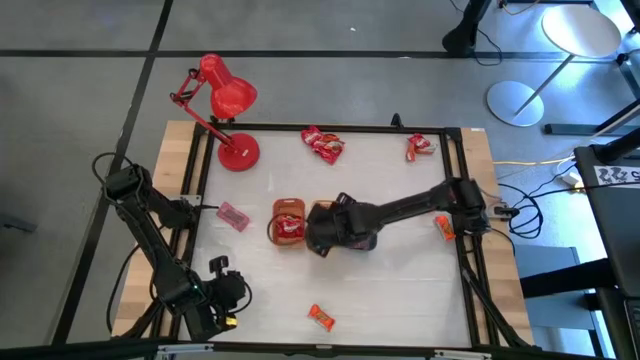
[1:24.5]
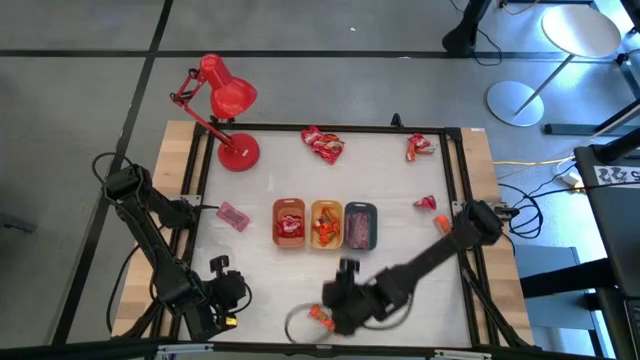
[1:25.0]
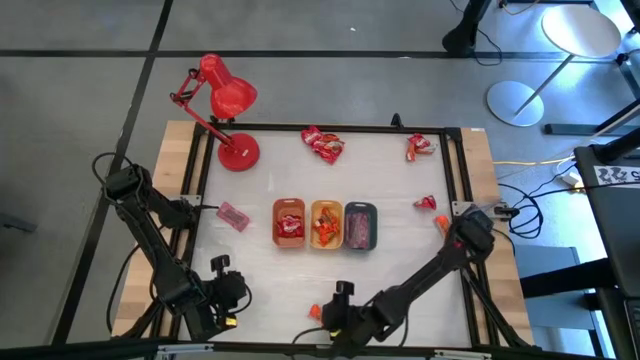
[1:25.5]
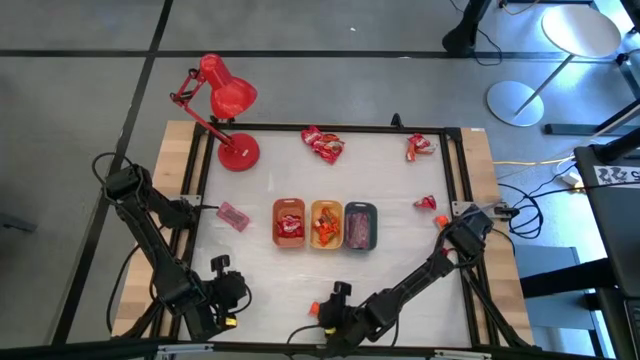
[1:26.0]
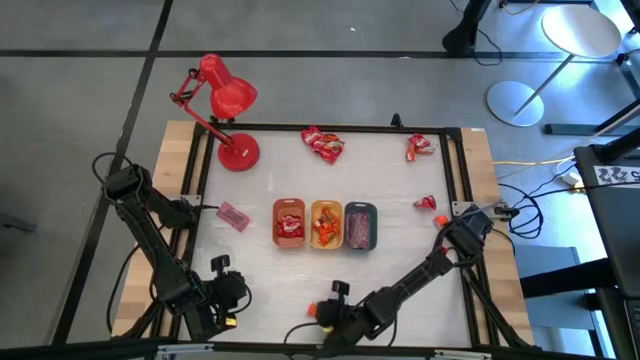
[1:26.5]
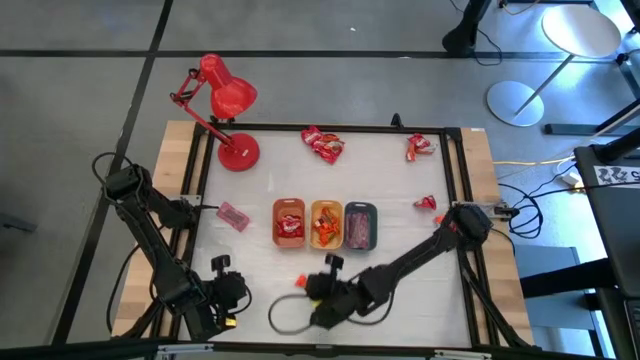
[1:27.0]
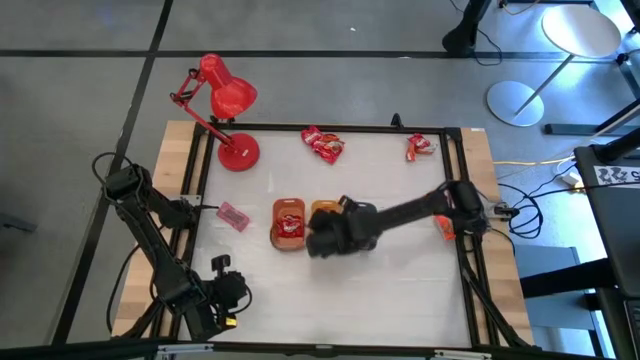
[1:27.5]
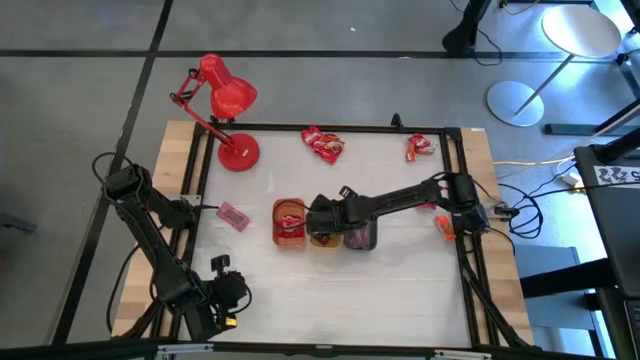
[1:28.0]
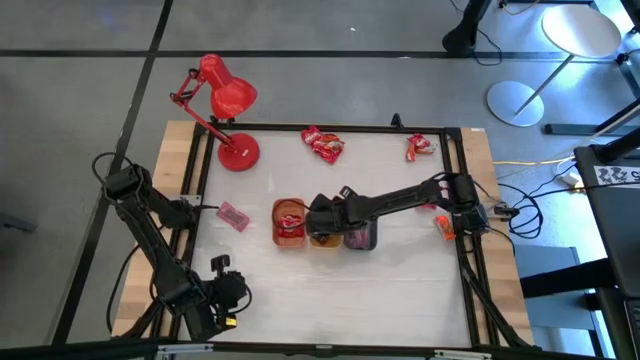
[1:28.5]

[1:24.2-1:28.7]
Task: Sort candy
Put the orange candy into the yellow bin

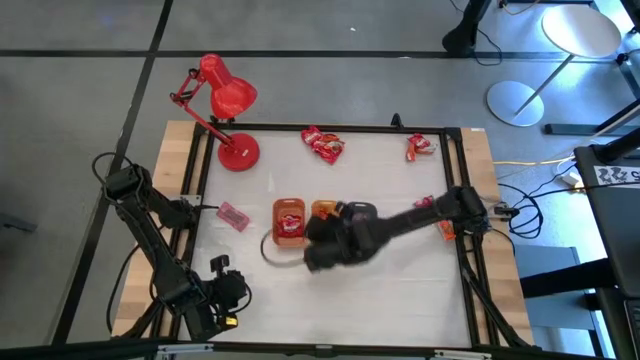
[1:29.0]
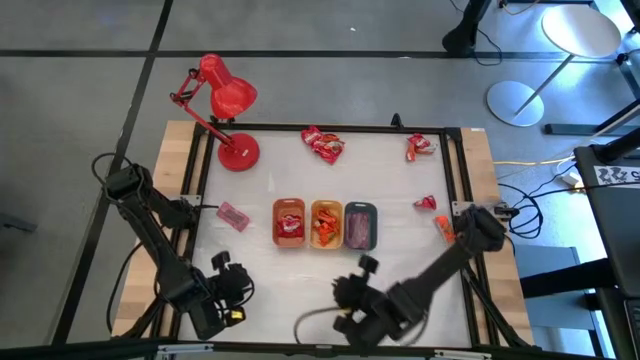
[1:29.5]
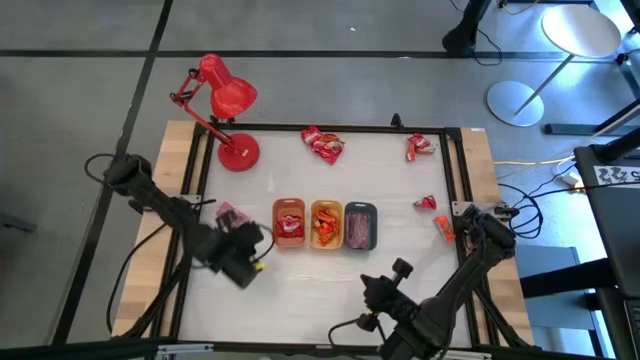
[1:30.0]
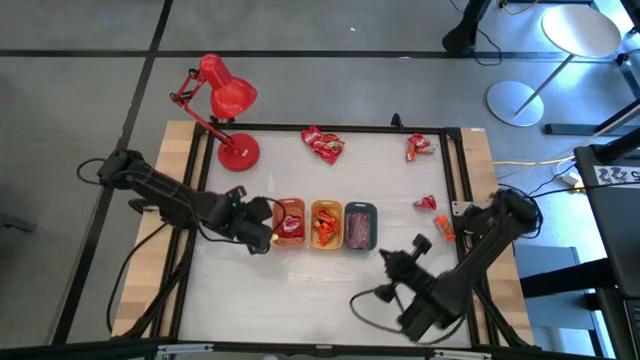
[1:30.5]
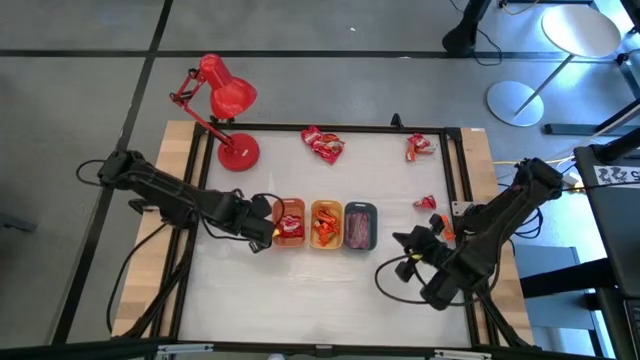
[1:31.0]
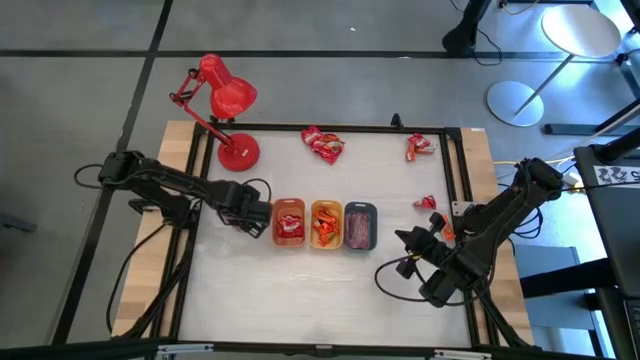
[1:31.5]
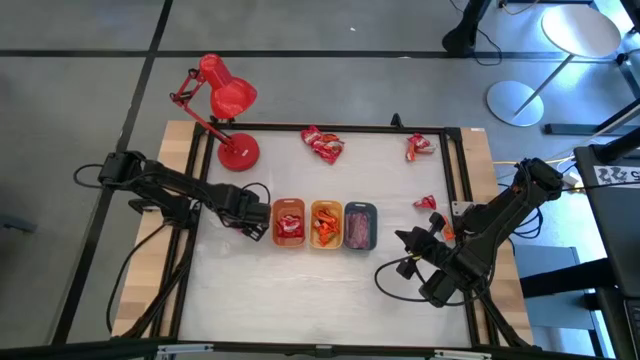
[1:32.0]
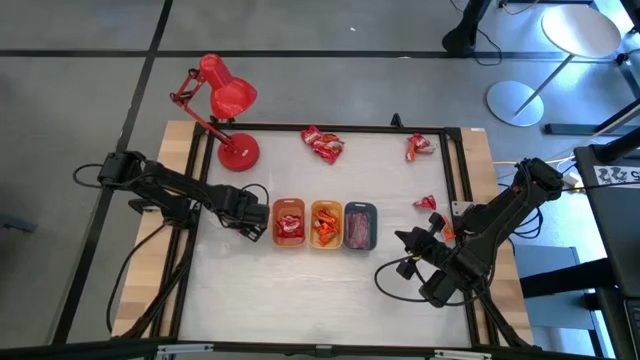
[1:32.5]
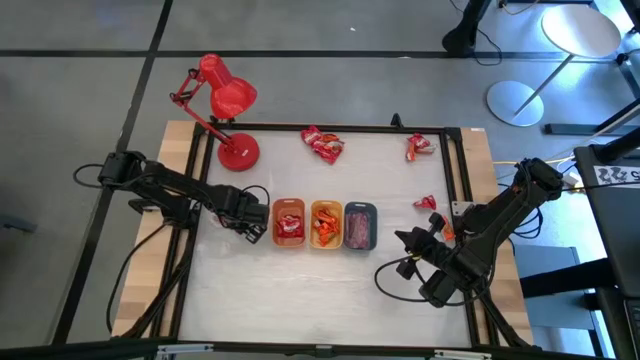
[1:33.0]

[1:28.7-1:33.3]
Put the pink candy into the blue bin

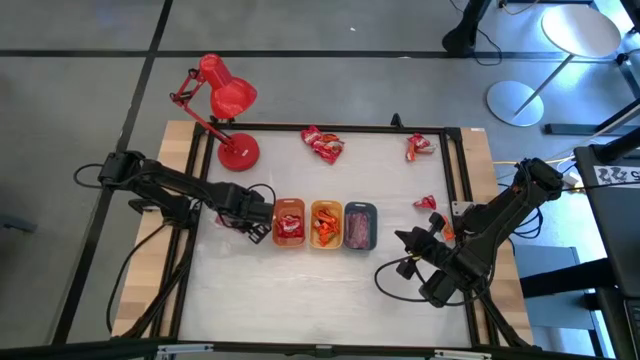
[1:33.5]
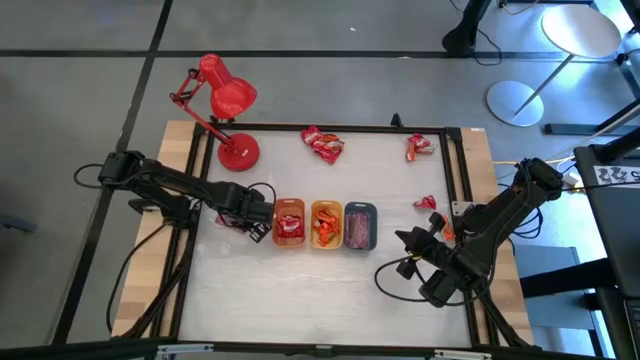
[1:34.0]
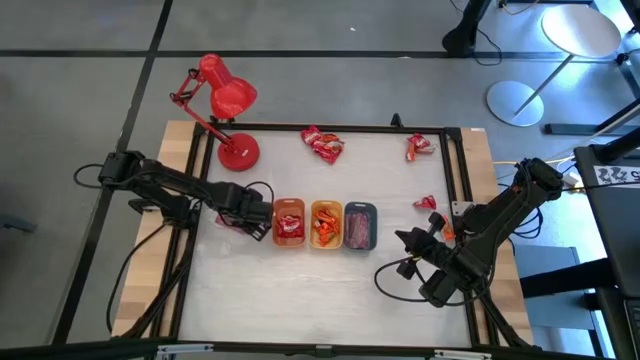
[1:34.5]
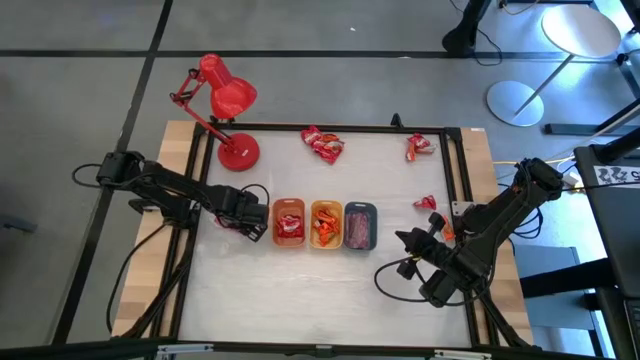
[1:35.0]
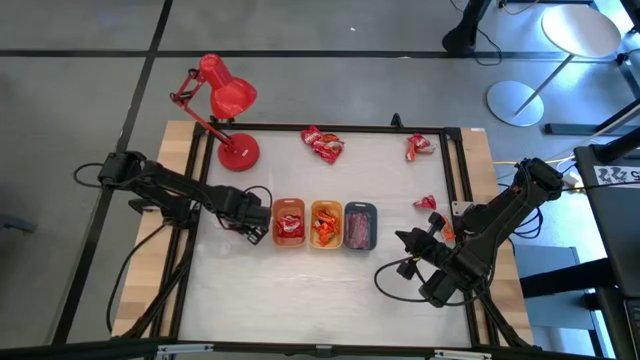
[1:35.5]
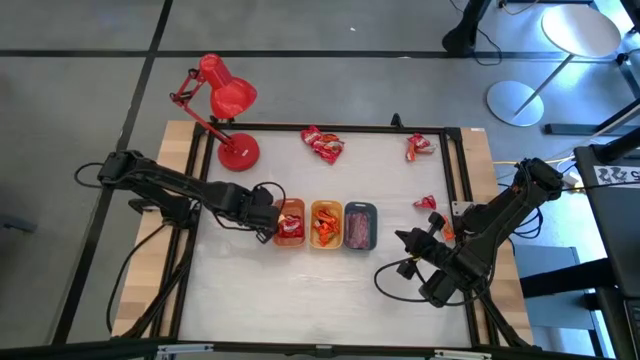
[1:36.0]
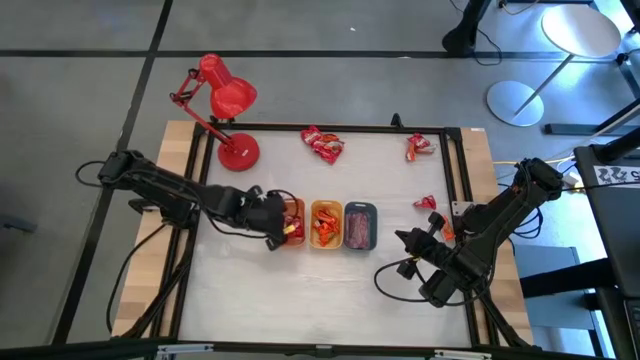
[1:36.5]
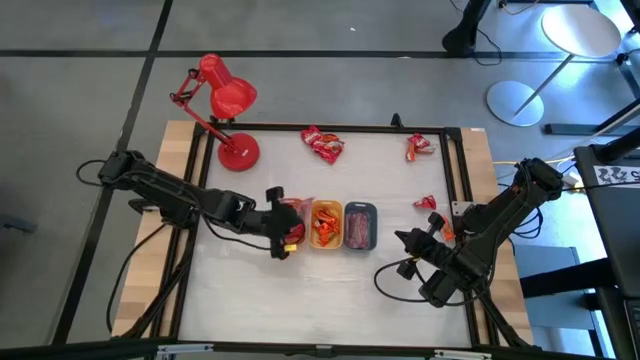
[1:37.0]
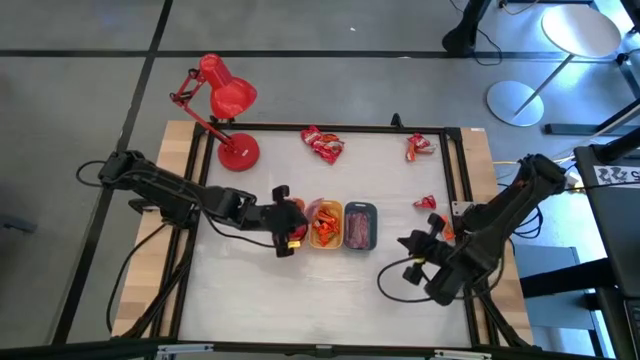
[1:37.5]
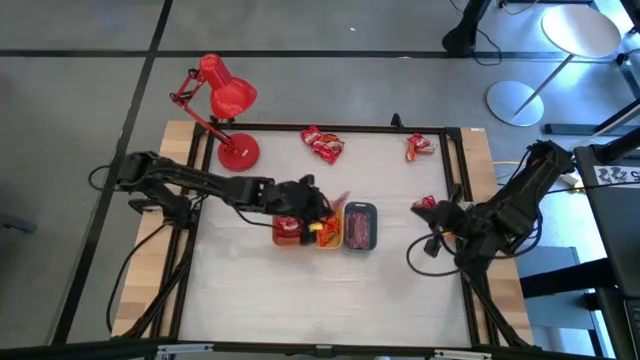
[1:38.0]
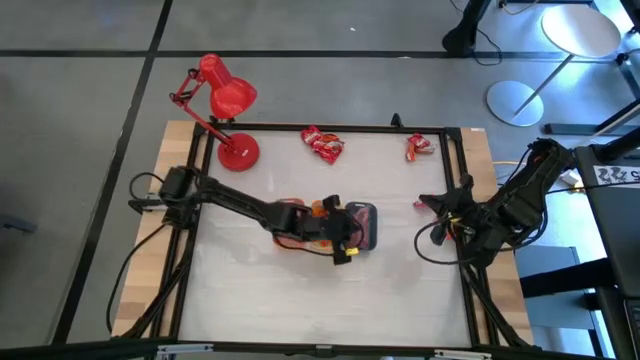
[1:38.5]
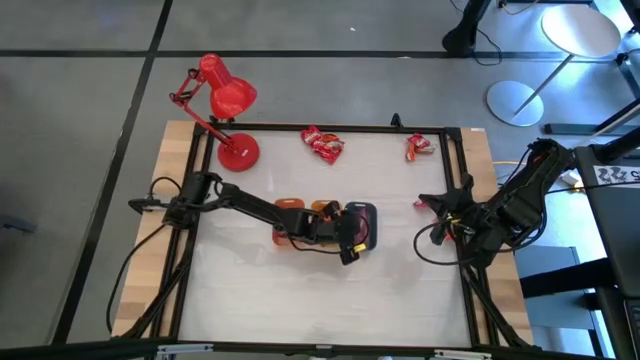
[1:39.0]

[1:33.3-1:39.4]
Put the pink candy into the blue bin

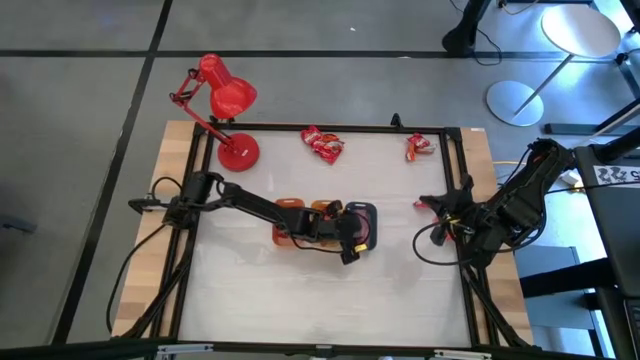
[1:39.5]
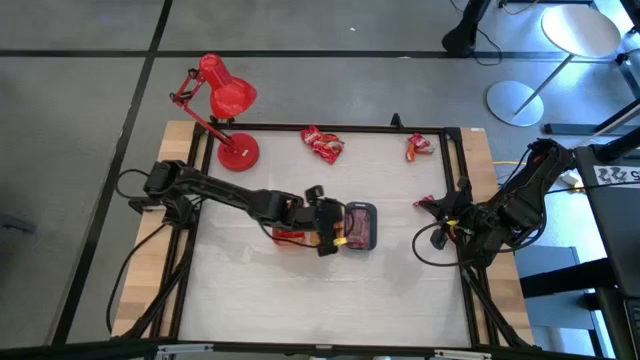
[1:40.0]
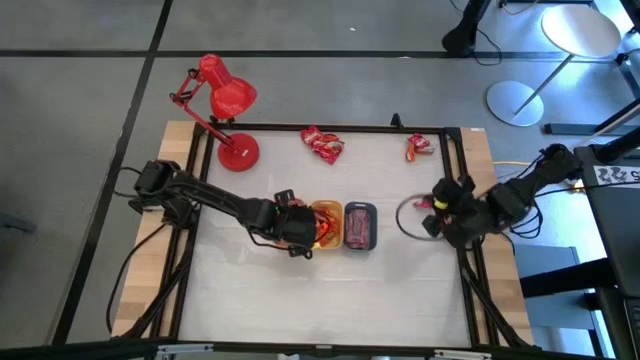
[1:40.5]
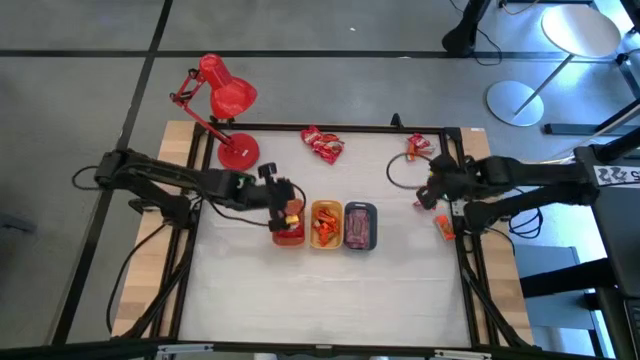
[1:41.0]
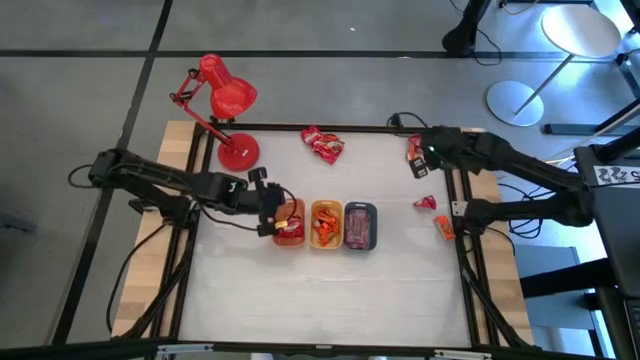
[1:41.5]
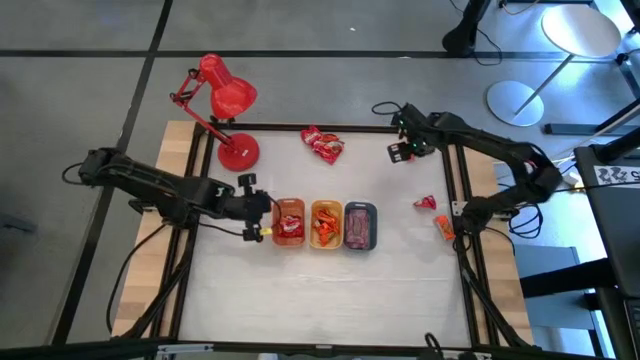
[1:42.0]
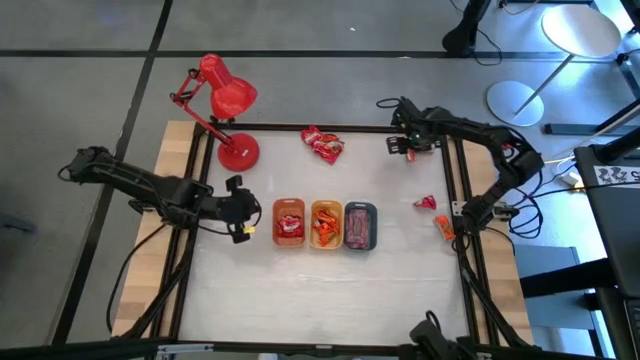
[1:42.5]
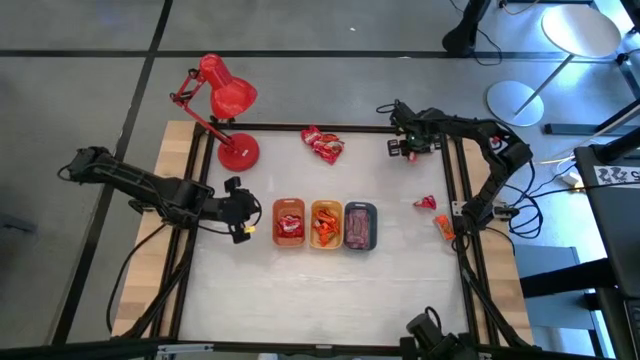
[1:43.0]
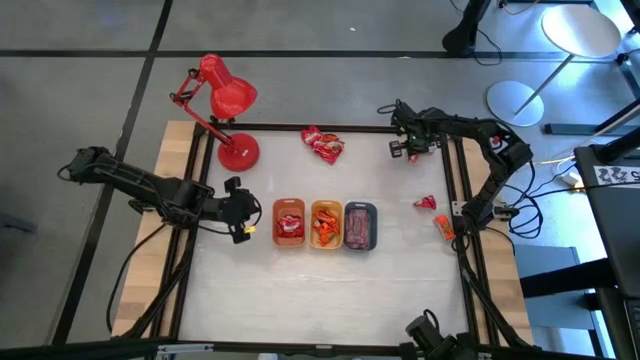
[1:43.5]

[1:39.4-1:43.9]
Put the orange candy into the yellow bin

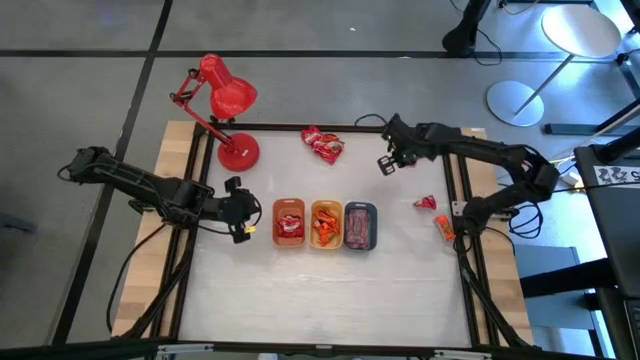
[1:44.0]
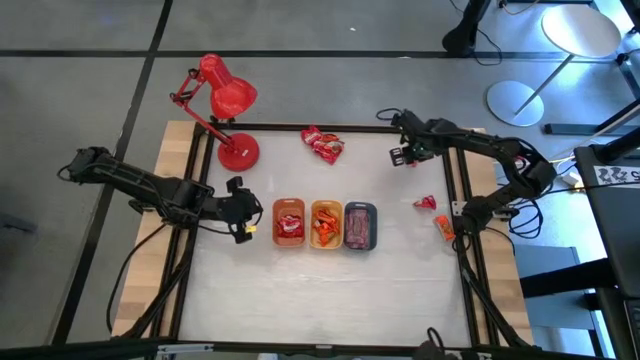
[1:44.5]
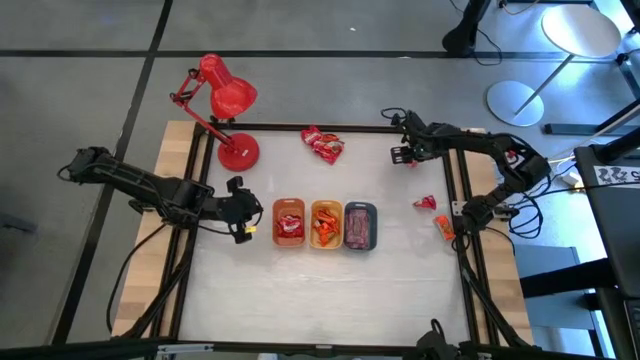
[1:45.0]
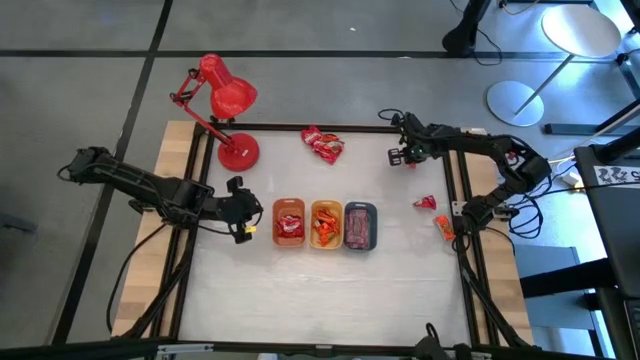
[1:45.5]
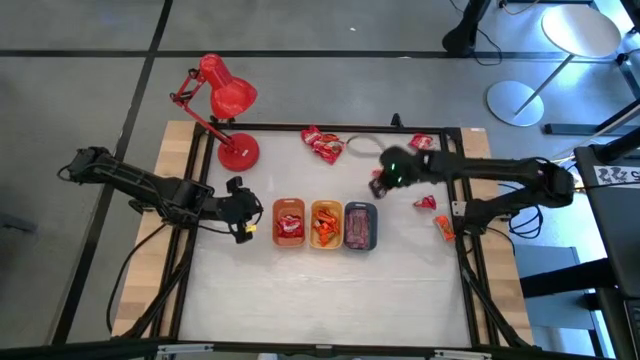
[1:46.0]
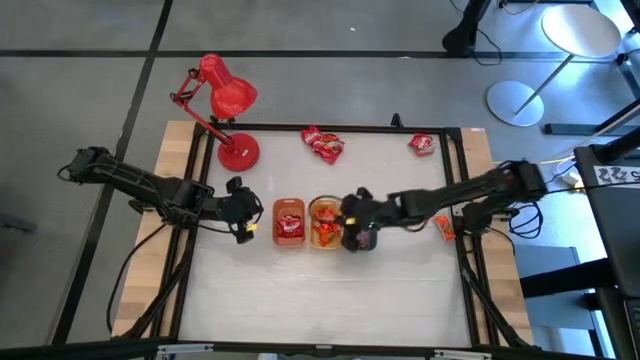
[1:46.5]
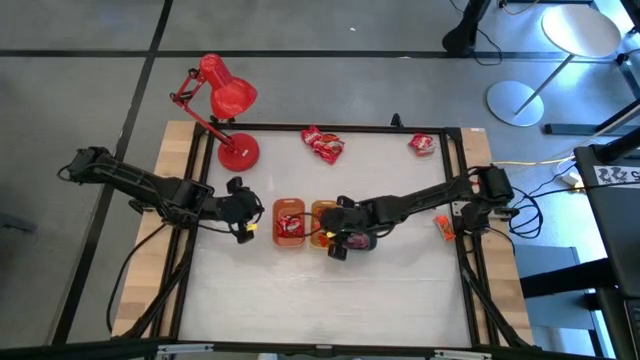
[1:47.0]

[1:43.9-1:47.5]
Put the orange candy into the yellow bin
